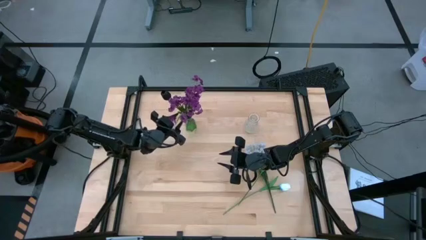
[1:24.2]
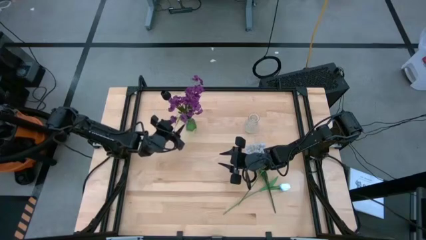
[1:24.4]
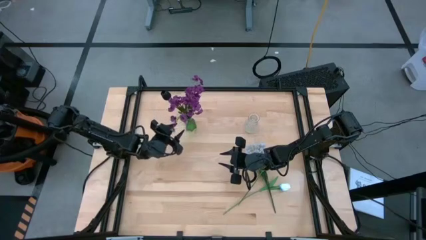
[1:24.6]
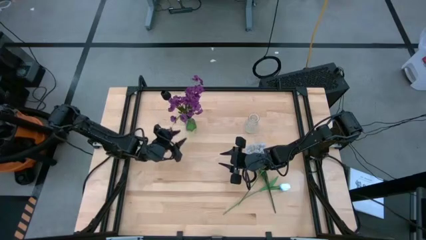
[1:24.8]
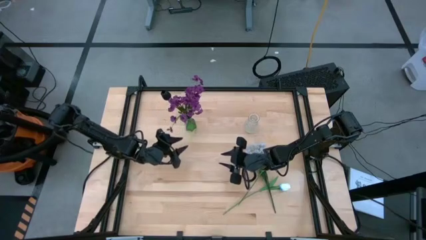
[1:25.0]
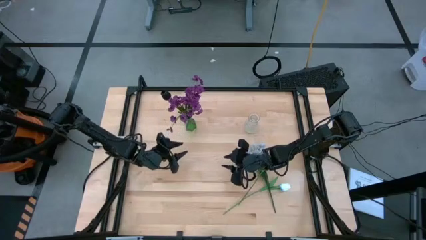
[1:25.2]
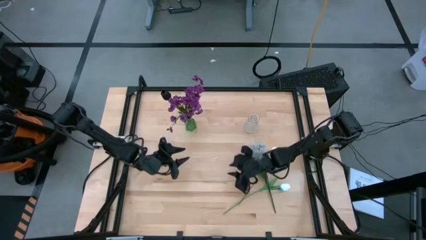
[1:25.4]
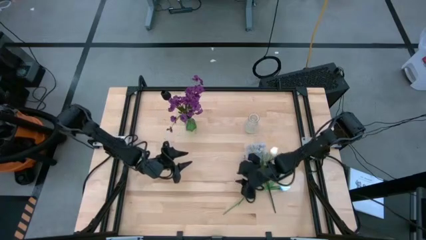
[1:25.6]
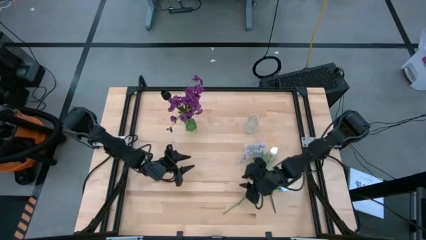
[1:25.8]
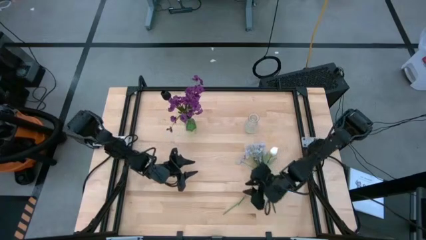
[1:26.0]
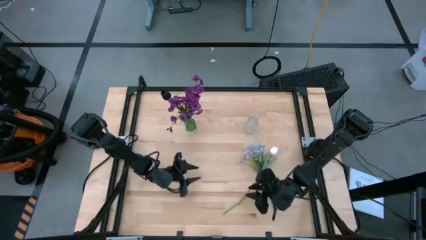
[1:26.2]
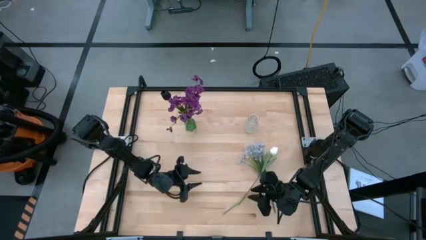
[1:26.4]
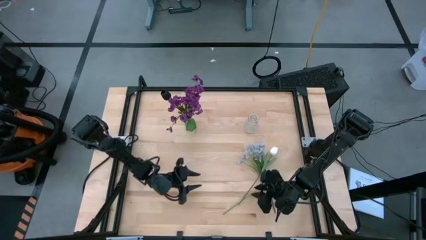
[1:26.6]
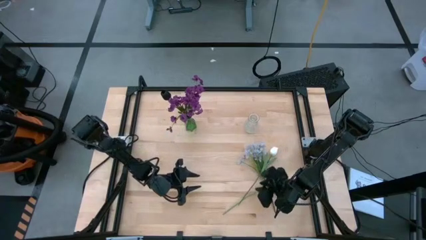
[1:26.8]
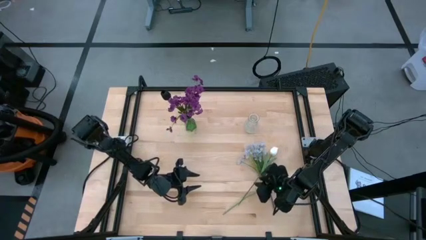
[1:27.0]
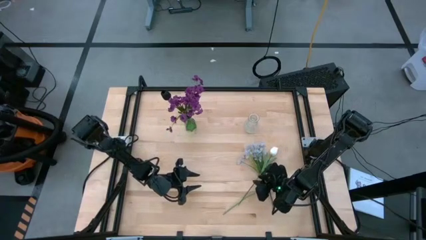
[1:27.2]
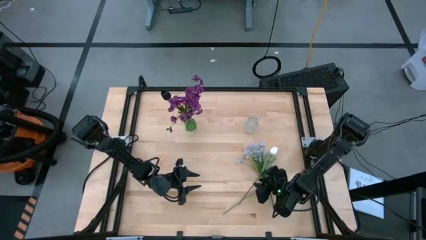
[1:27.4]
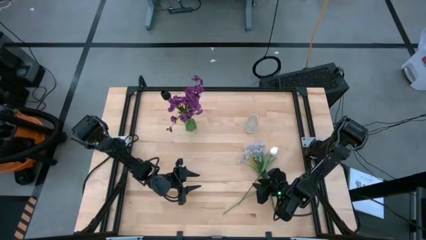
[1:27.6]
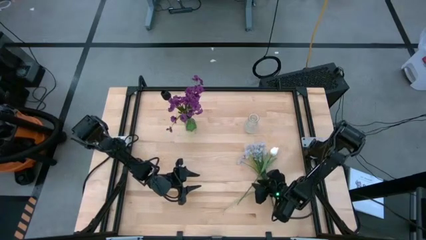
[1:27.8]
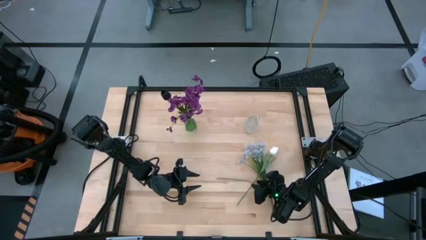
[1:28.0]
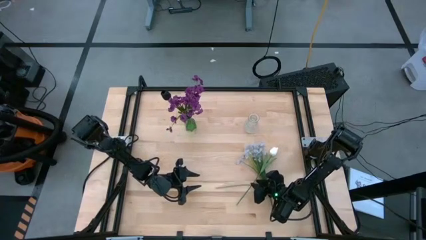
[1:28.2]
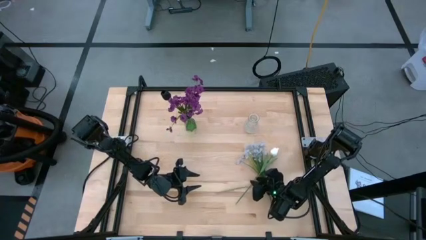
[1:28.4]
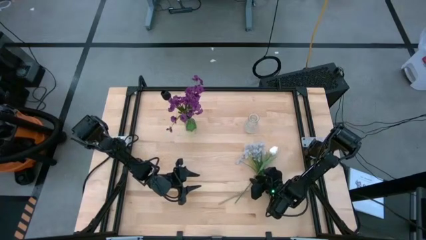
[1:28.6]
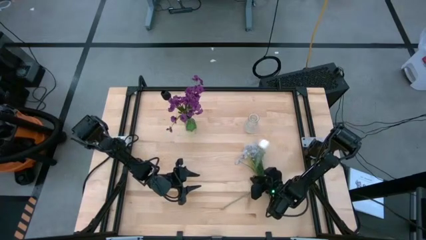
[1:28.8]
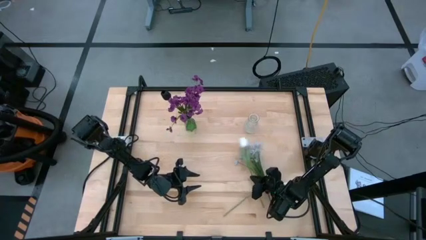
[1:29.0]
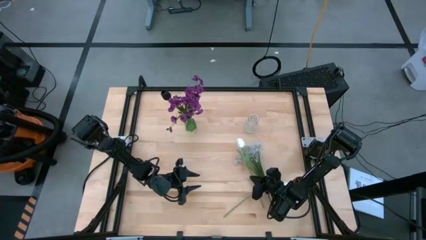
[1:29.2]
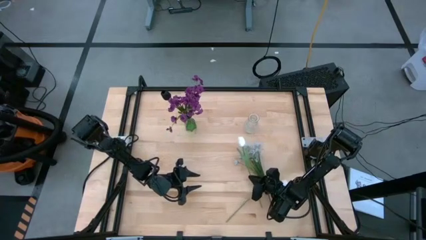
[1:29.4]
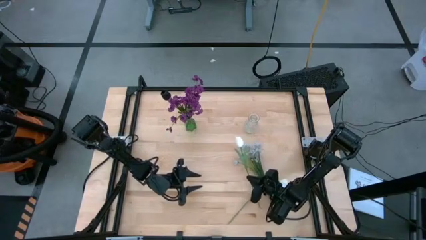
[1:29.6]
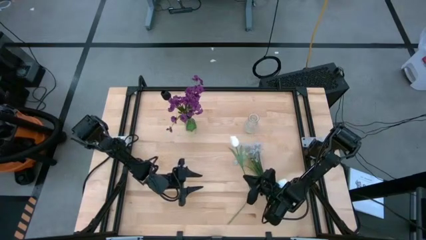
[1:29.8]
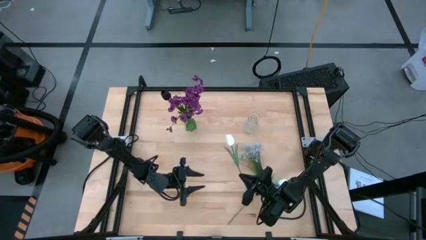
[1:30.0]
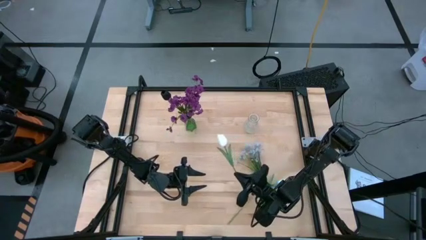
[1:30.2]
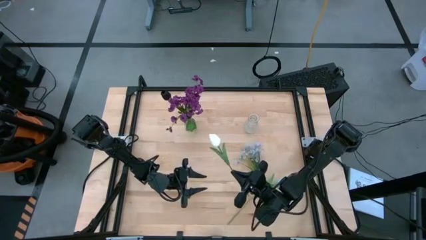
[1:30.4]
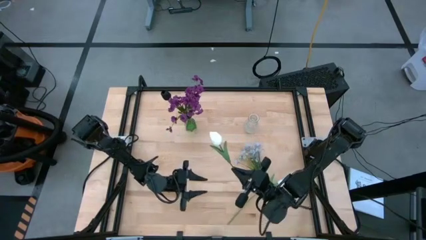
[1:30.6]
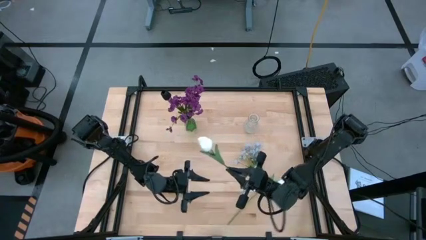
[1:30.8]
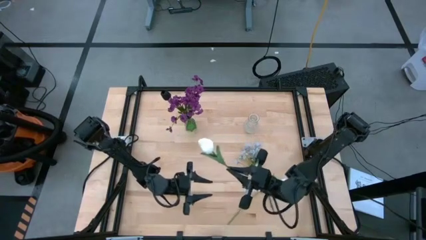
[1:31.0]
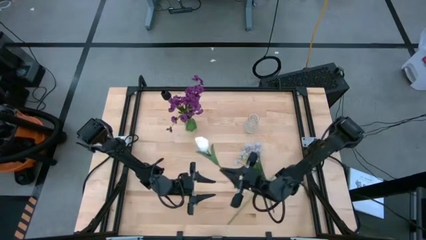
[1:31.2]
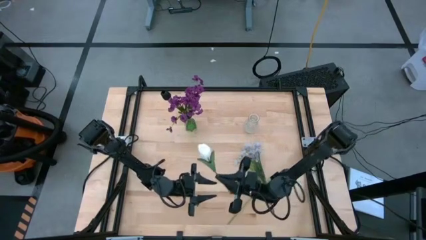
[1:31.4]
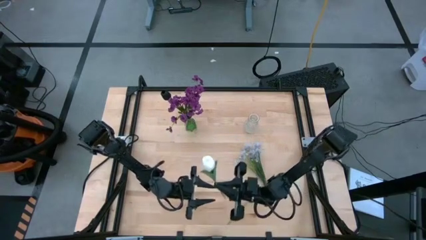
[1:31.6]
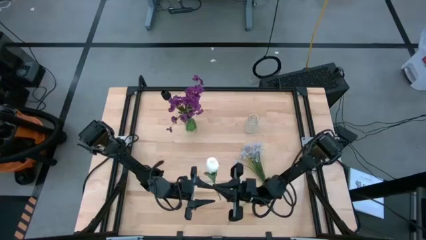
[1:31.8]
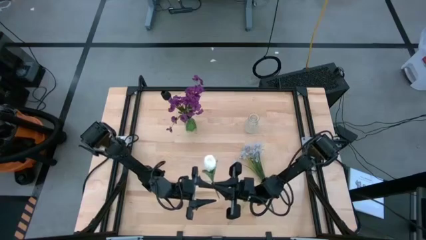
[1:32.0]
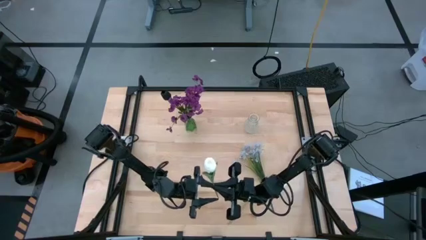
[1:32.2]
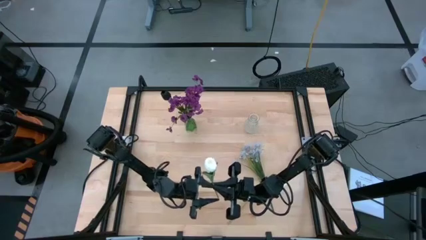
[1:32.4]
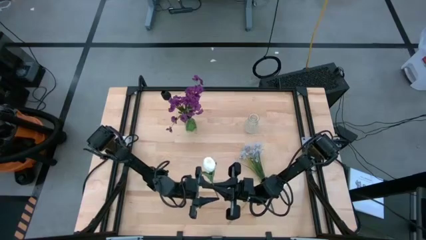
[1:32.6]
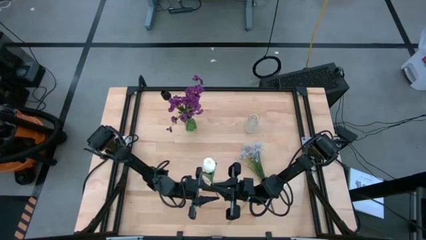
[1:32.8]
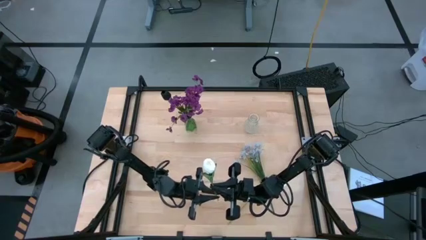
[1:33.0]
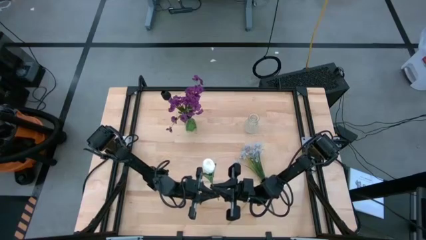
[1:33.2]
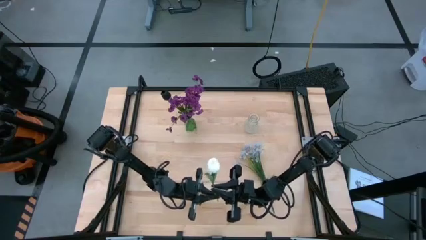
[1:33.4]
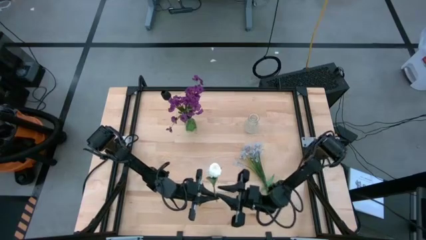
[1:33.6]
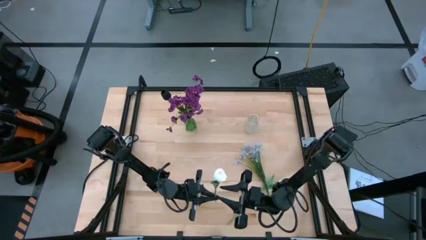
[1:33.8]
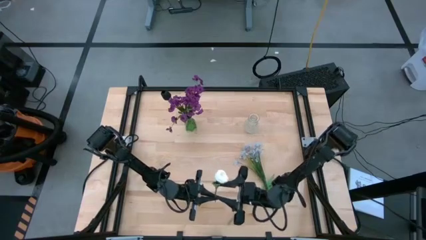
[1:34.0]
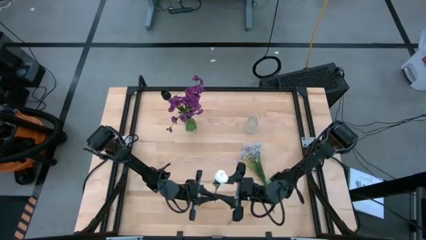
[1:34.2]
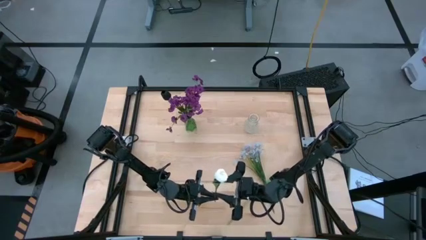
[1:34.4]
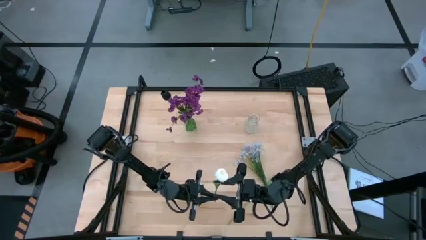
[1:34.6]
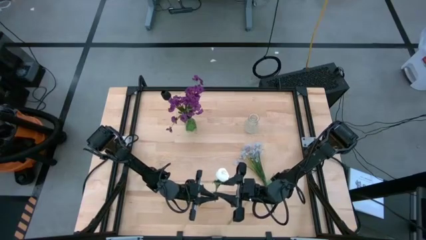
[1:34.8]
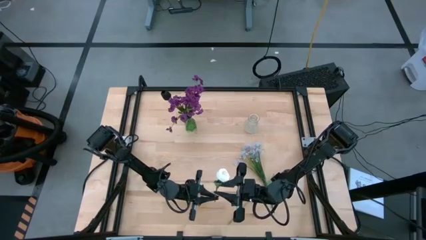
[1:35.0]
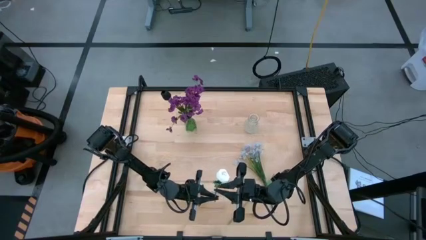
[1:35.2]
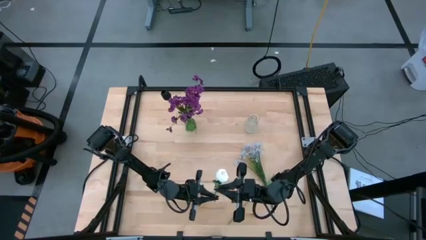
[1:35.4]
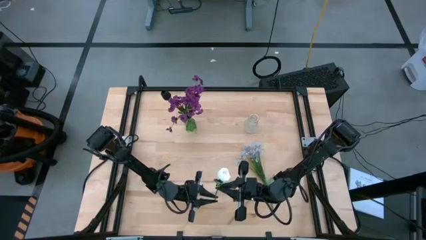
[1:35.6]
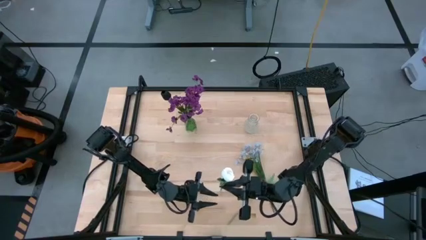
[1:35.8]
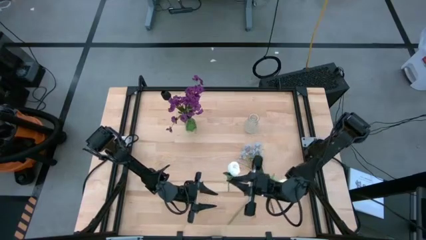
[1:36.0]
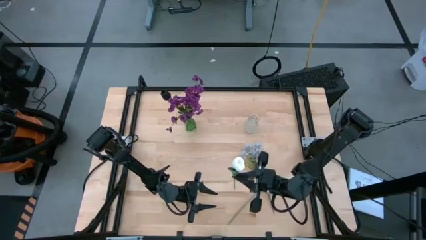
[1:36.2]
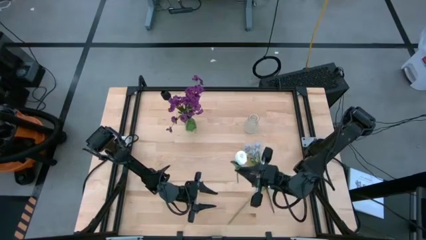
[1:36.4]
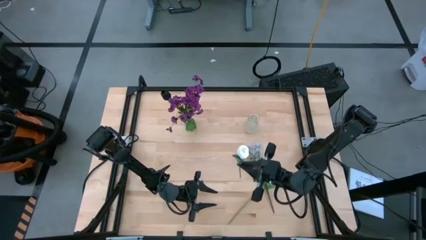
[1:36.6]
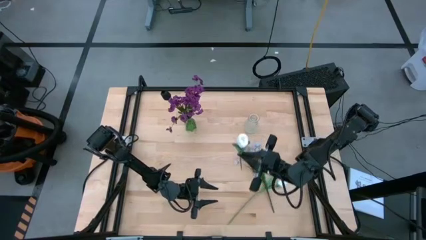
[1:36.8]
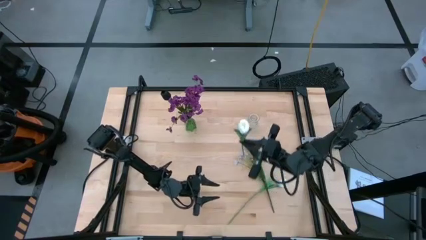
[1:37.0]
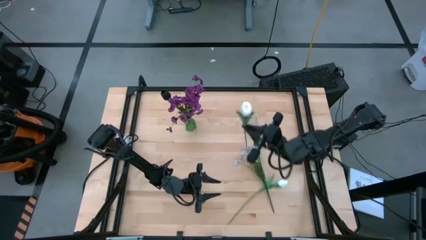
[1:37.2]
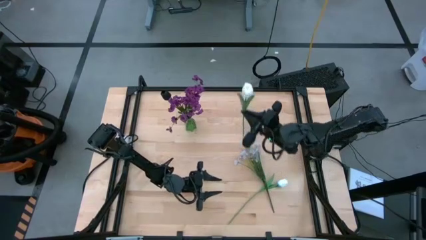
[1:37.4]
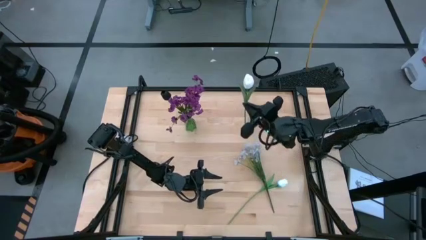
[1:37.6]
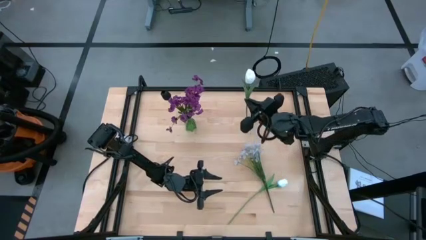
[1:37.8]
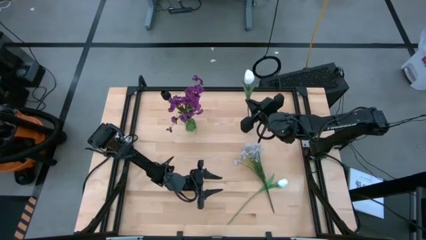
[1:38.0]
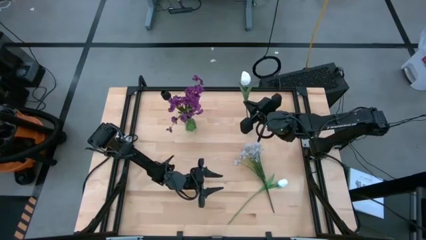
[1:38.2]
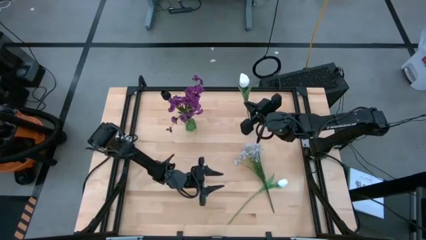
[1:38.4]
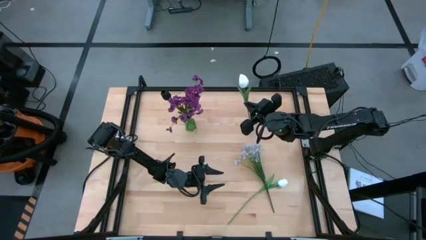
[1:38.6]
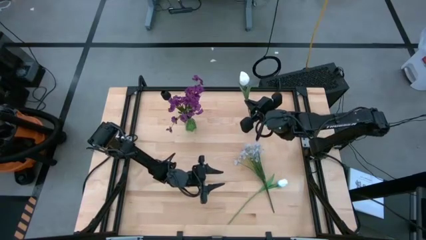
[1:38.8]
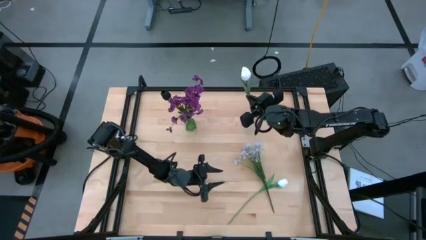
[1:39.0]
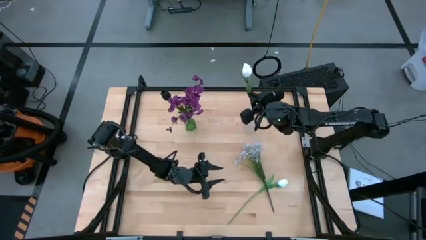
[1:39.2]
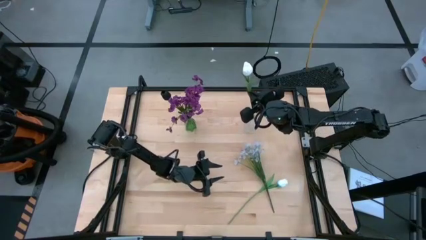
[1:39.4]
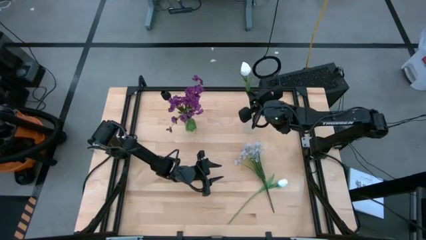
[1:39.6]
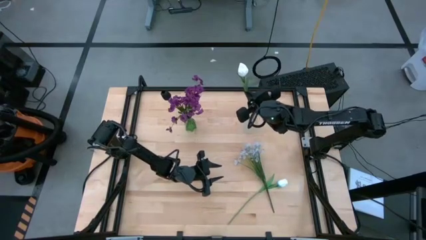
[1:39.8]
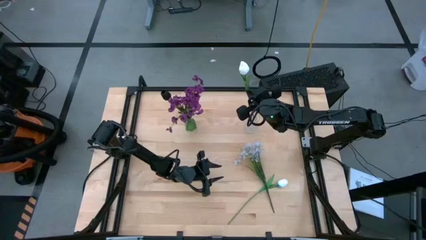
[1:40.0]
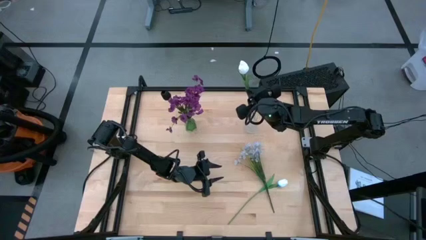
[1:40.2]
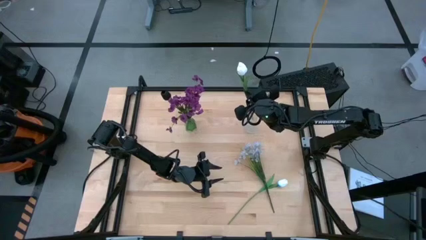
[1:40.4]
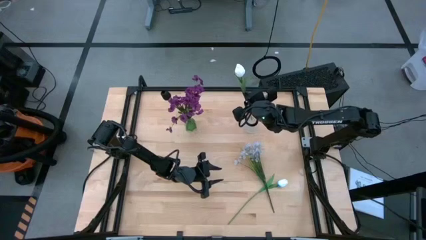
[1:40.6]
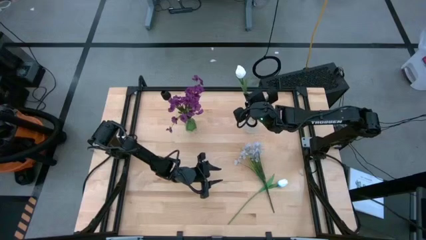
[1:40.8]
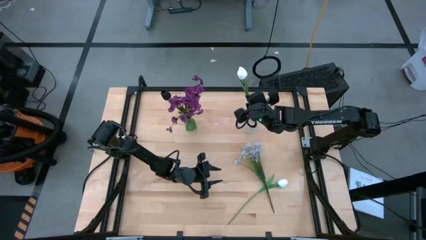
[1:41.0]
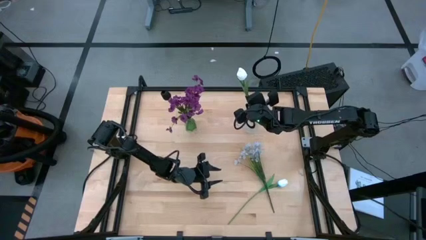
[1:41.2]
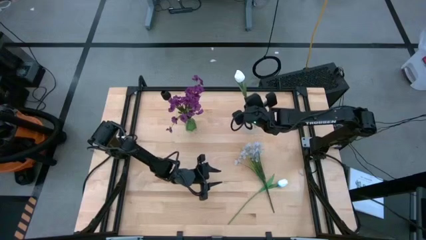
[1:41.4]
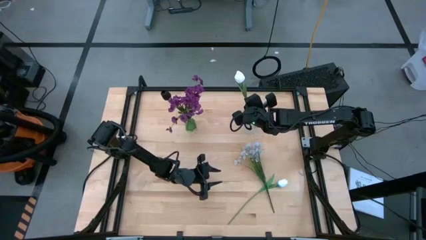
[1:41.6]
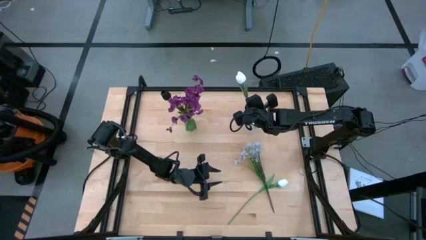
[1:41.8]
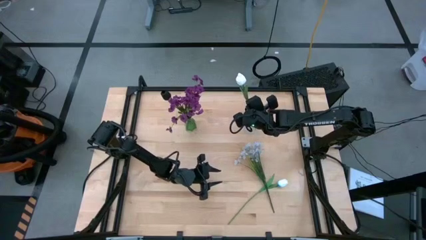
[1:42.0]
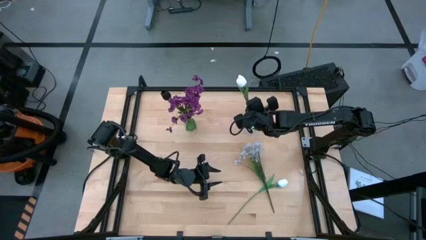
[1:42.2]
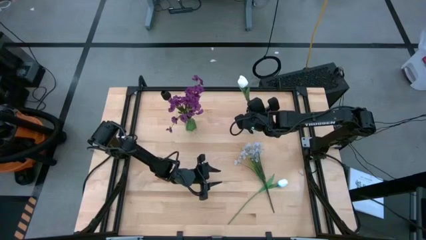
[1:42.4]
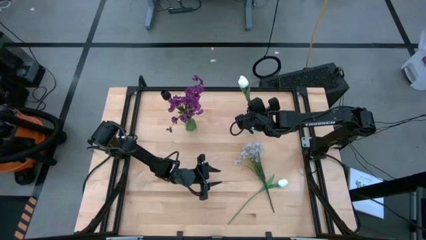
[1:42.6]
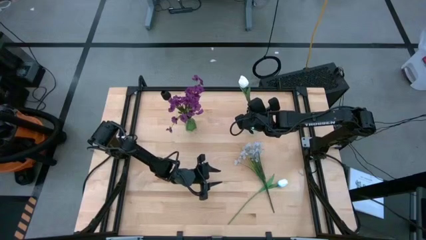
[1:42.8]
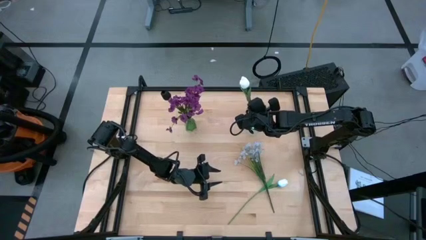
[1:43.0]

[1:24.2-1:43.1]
Task: Sort flowers into vase by color
Put the top white flower into the transparent vase
